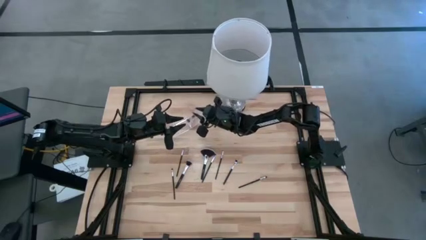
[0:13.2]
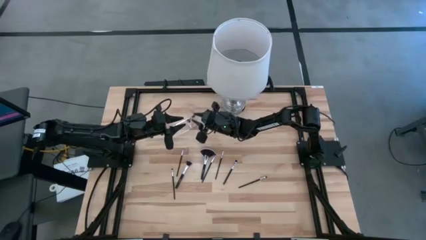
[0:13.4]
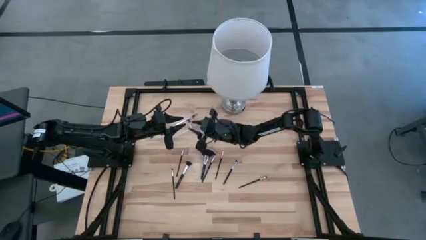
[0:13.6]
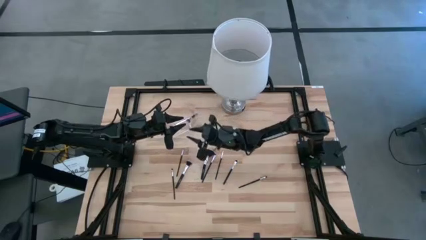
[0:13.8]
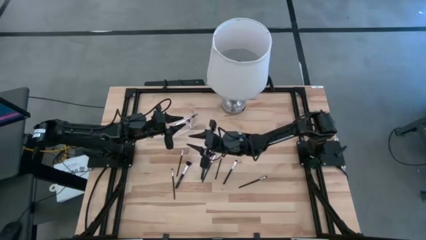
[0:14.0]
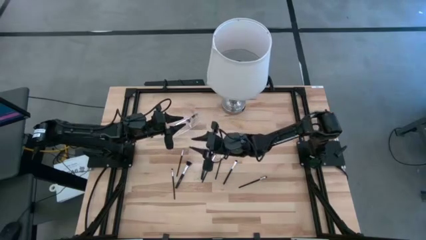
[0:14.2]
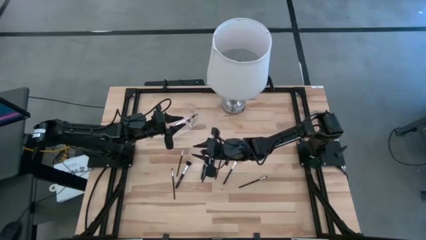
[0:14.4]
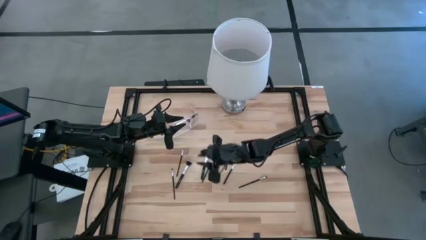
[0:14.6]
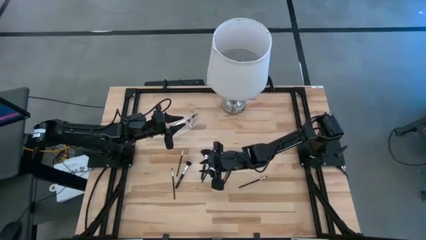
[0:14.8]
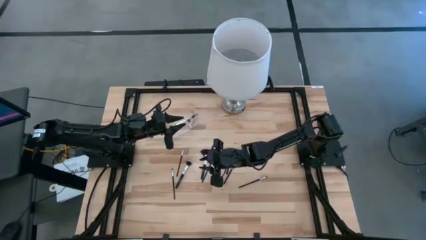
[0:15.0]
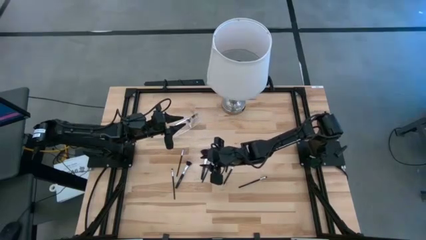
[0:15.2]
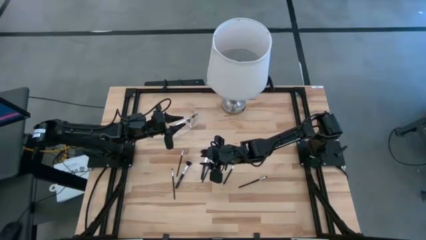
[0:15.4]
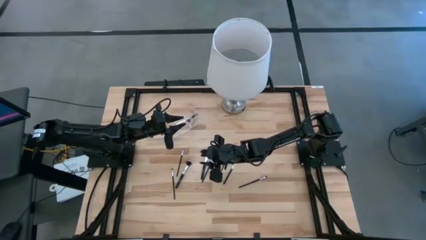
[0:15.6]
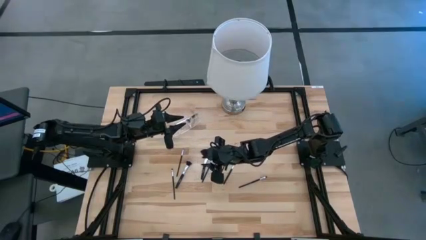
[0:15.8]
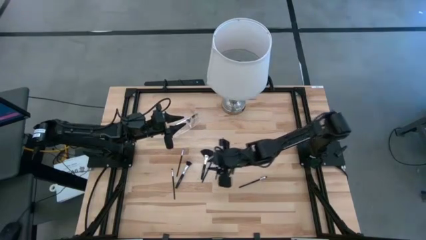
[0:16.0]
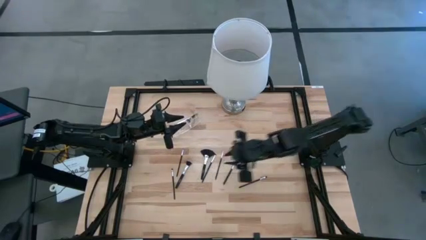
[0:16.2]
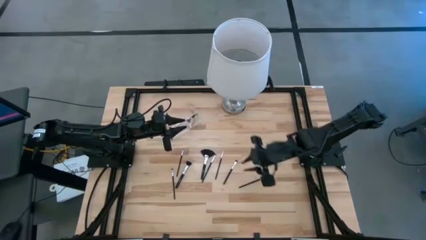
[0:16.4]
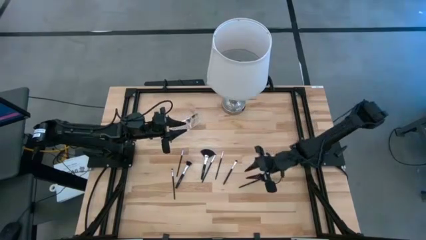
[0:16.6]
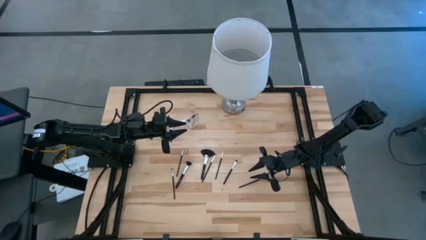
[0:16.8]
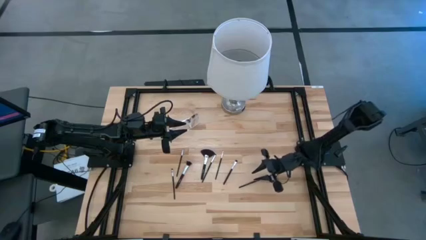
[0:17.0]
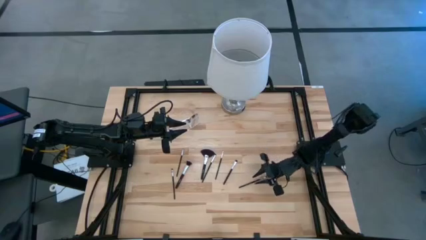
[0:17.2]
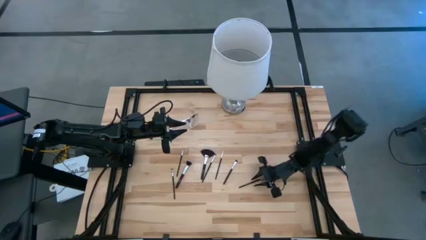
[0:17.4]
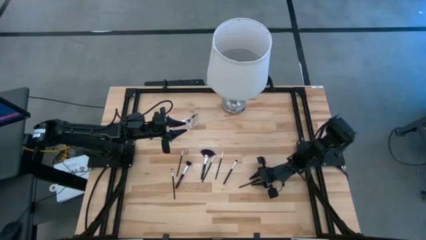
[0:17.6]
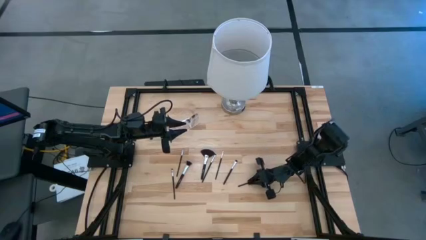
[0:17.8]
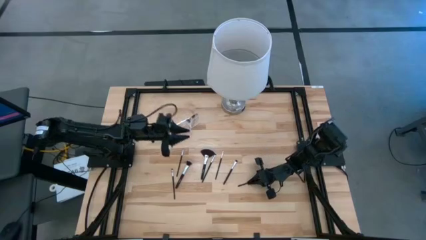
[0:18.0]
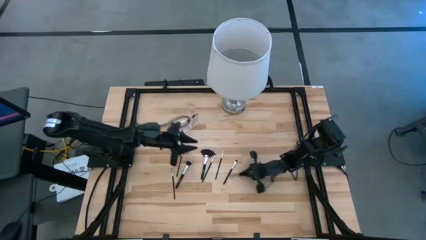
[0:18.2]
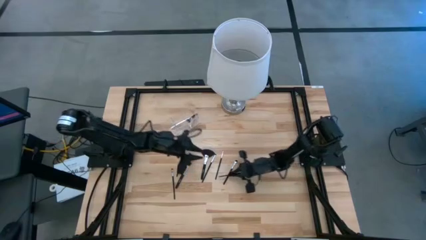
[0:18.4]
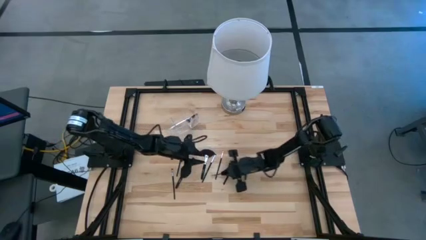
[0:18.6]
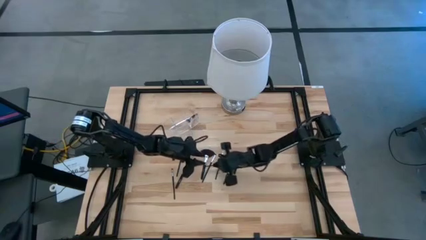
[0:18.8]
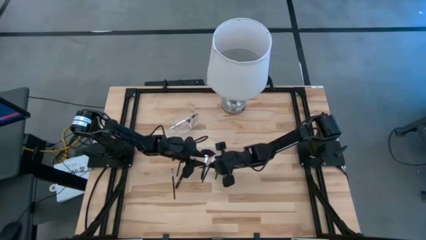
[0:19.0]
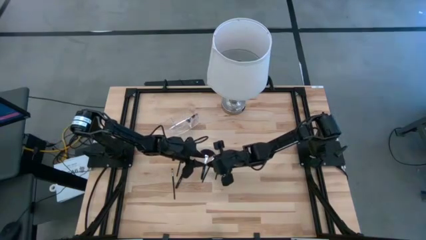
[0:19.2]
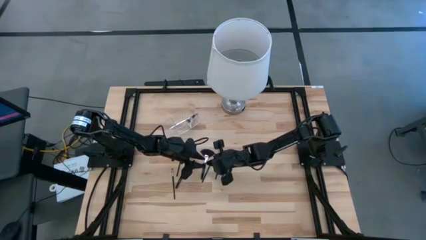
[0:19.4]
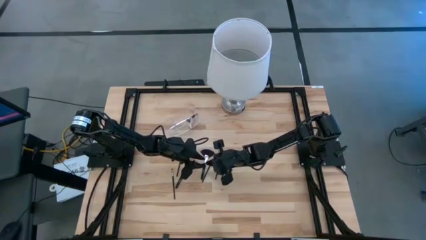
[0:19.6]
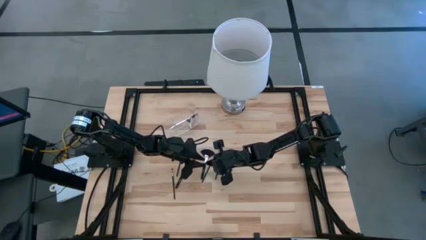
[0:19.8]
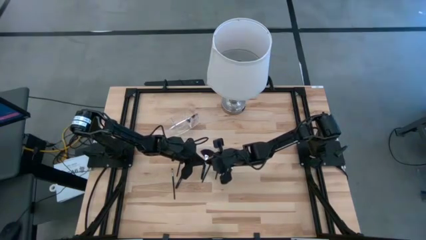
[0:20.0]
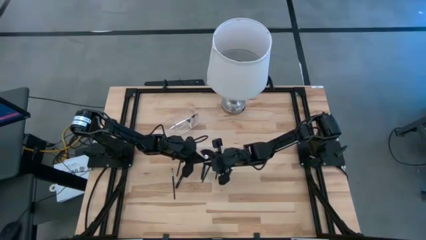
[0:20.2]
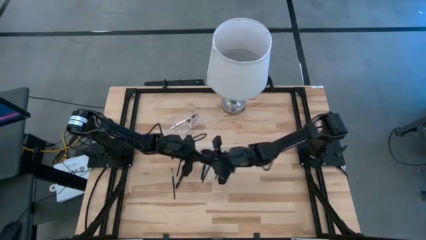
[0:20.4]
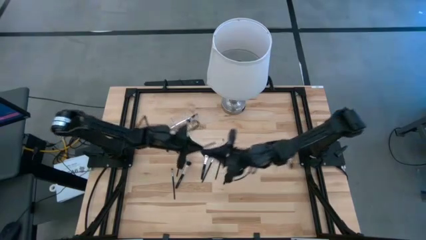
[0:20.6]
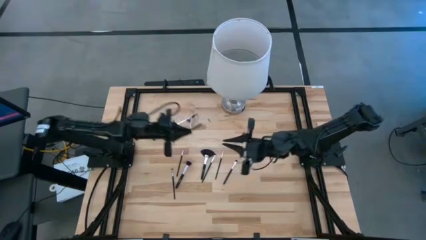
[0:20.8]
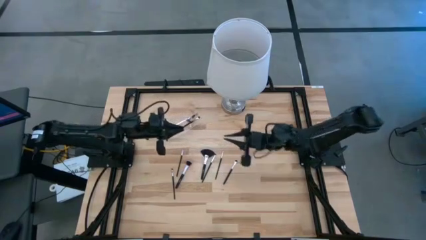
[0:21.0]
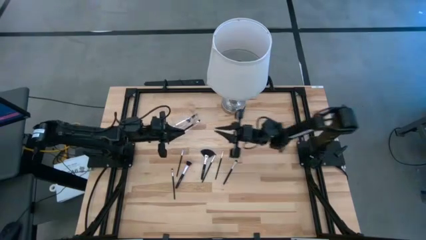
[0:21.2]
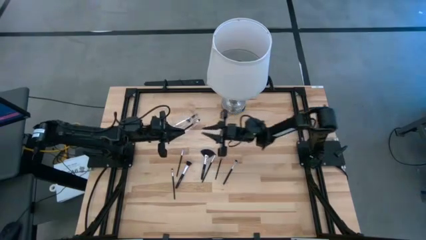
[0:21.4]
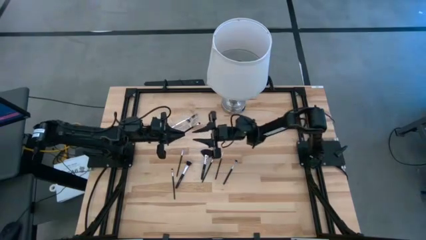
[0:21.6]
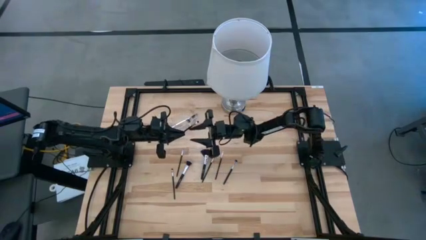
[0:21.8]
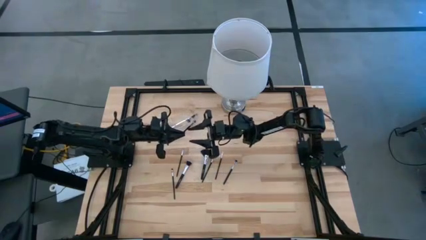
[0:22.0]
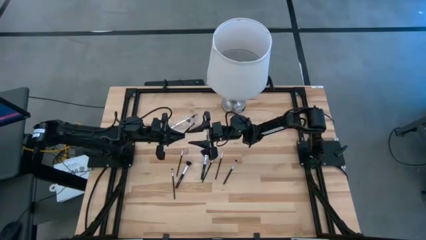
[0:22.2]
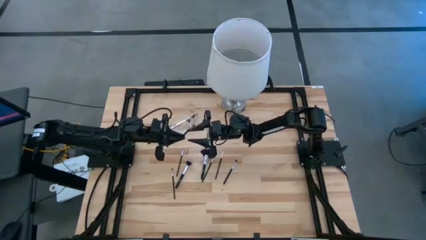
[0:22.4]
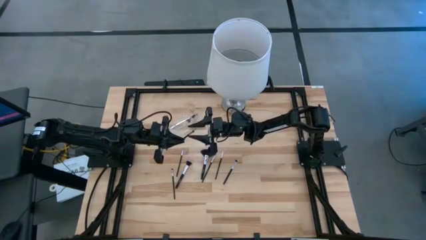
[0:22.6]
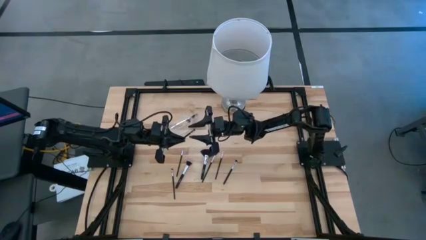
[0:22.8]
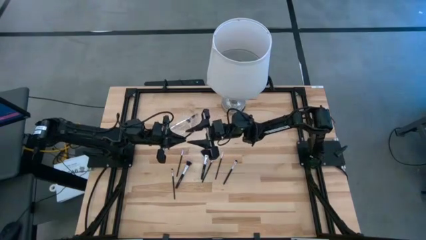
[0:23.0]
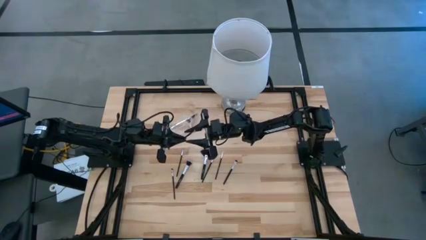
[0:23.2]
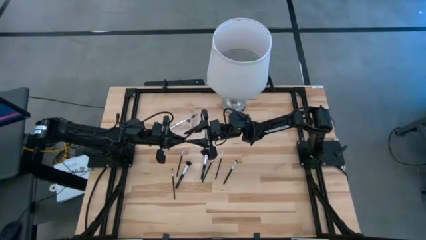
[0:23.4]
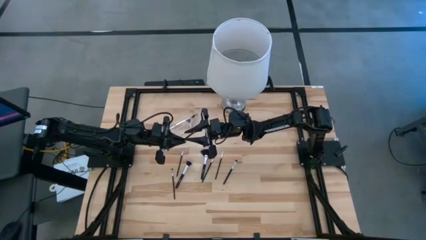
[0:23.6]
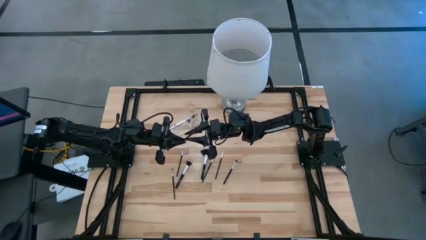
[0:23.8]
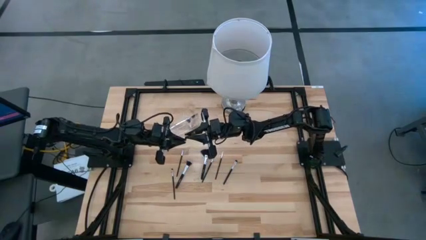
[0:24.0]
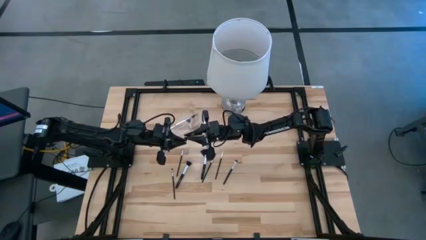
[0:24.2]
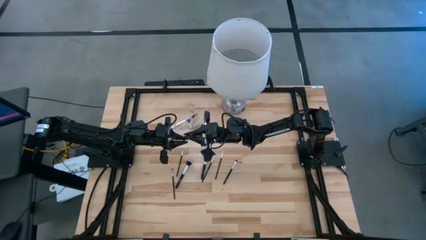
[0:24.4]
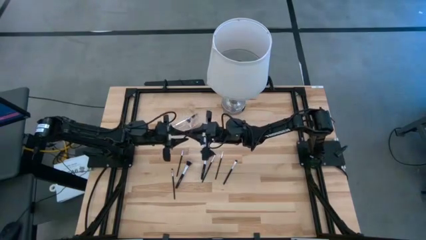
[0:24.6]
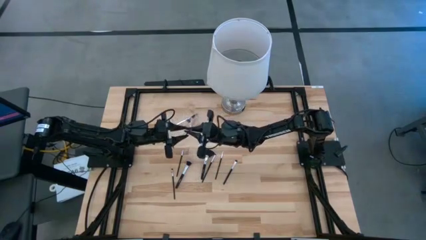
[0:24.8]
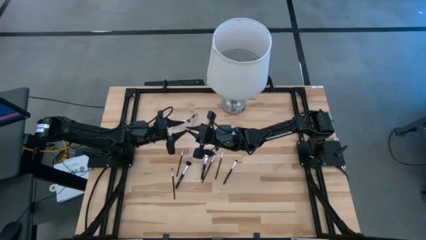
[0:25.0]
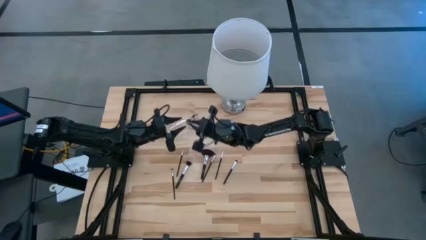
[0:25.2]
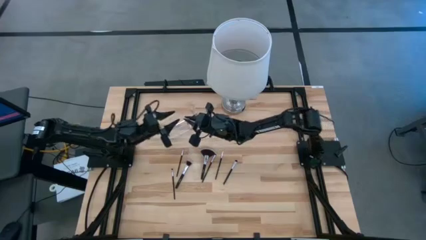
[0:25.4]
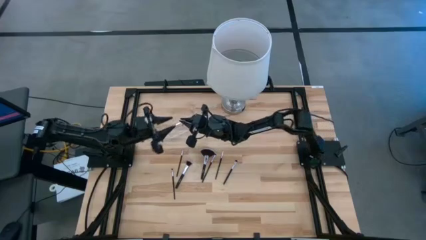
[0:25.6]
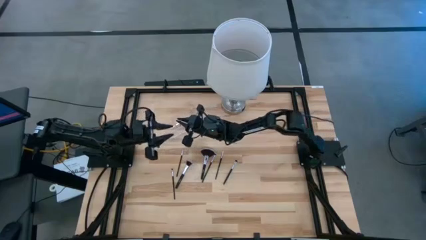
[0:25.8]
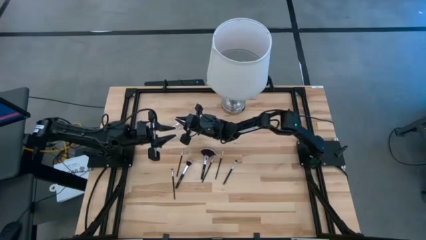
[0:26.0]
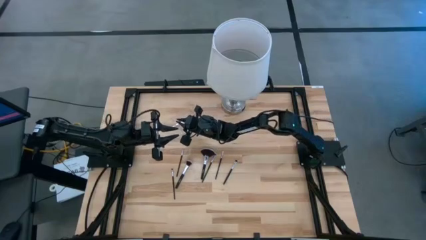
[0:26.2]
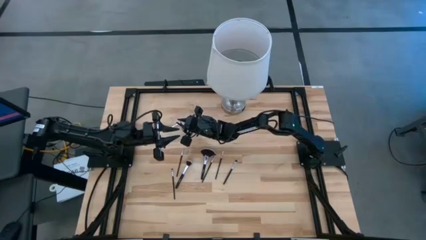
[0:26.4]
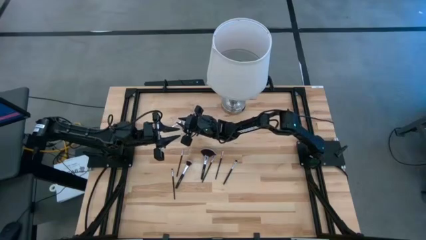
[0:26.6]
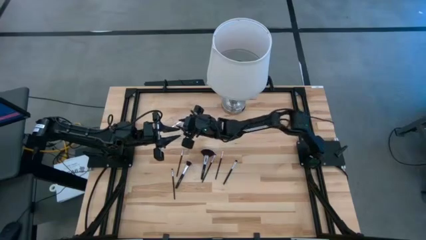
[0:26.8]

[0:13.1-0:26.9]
Task: Put items in baskets/containers
Put the black eyeshadow brush into the transparent organizer
